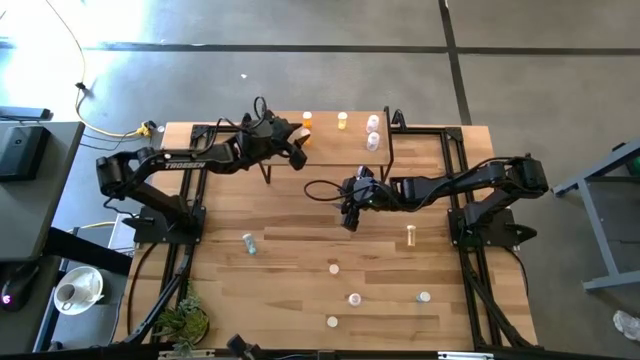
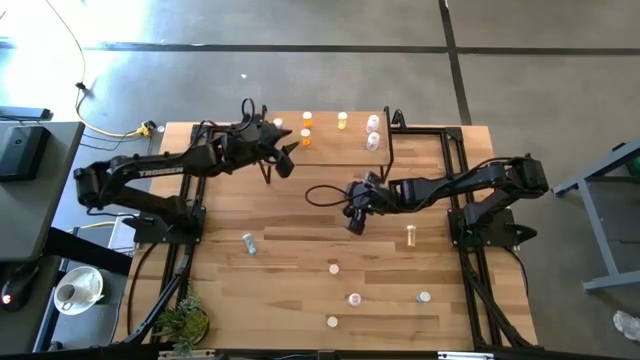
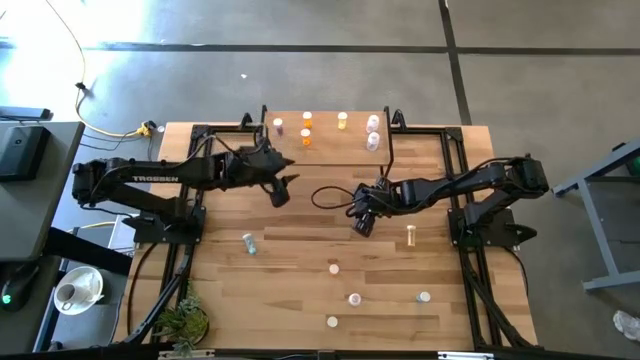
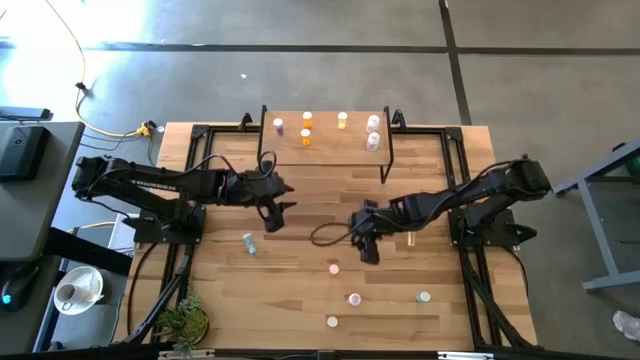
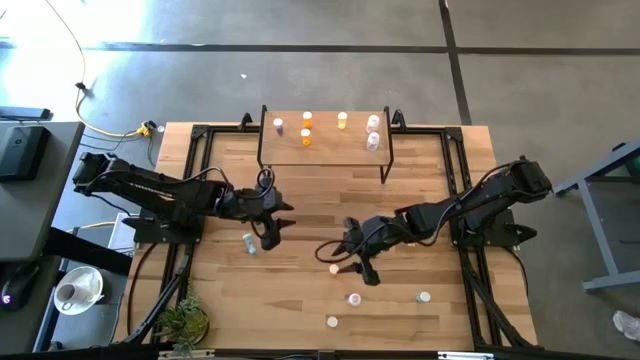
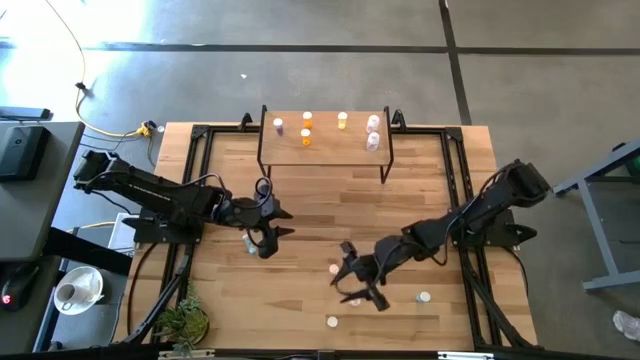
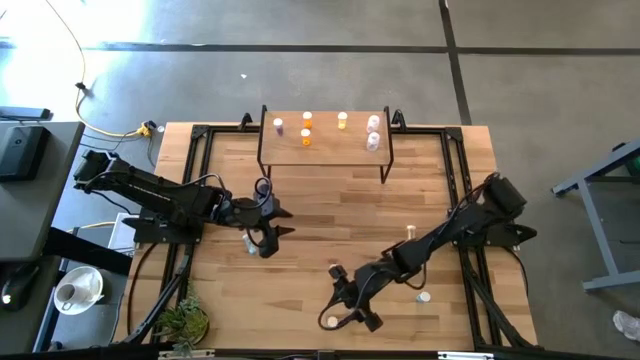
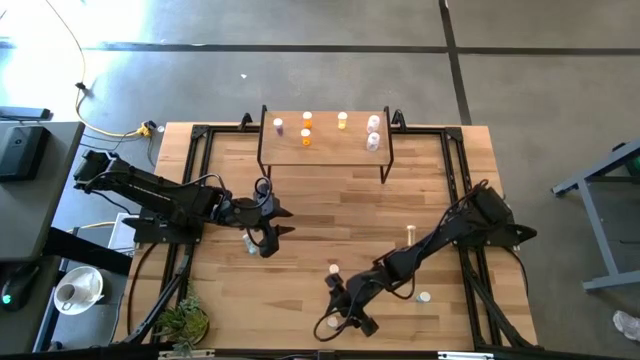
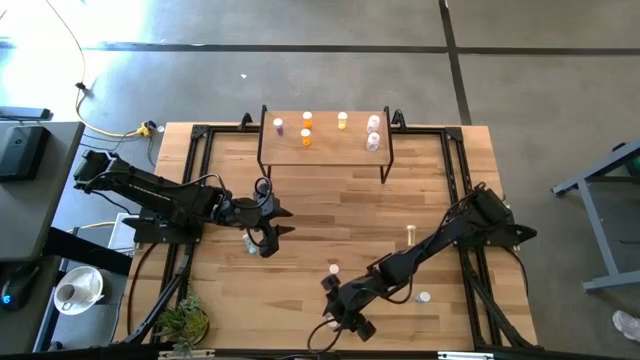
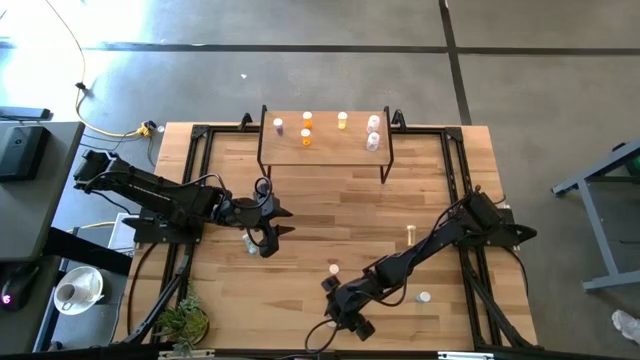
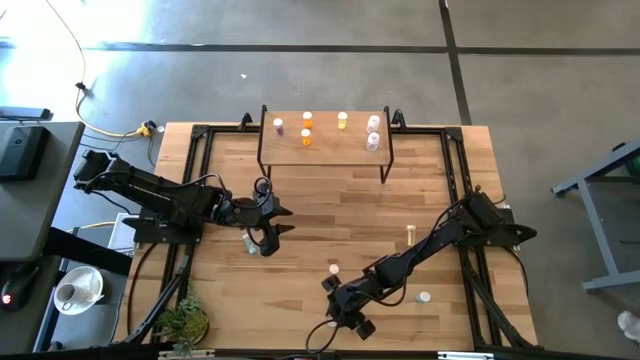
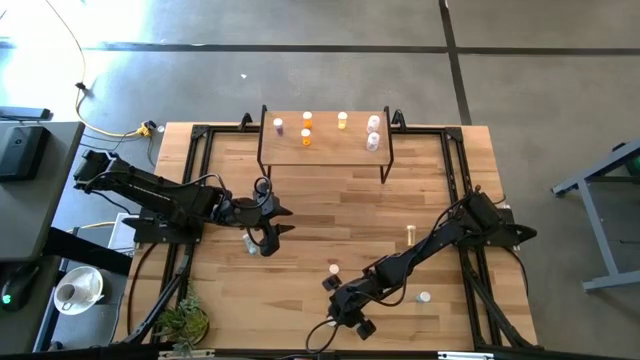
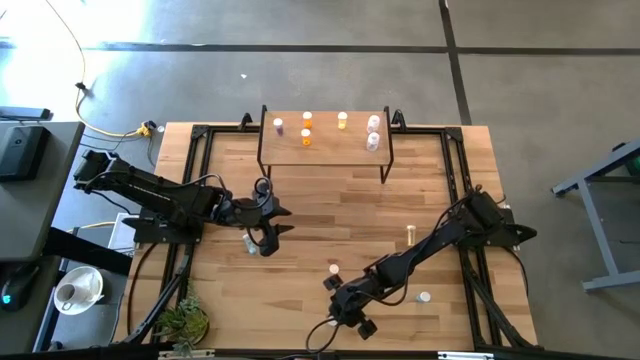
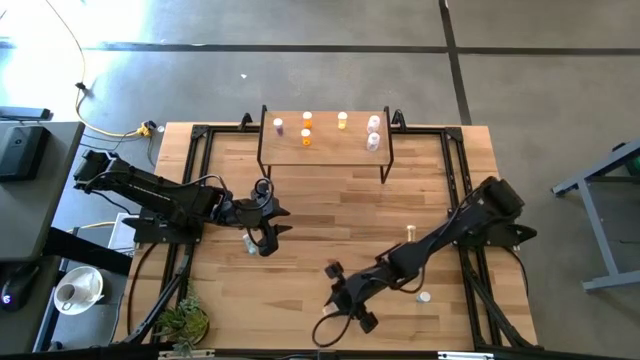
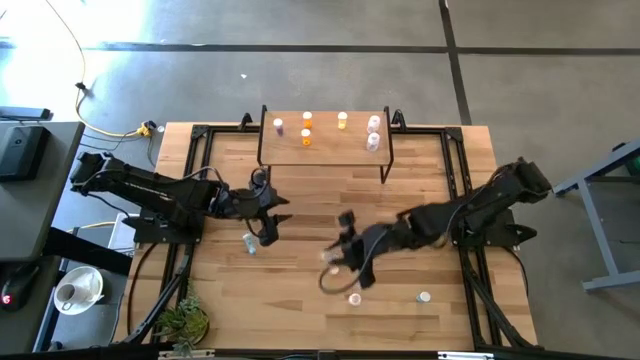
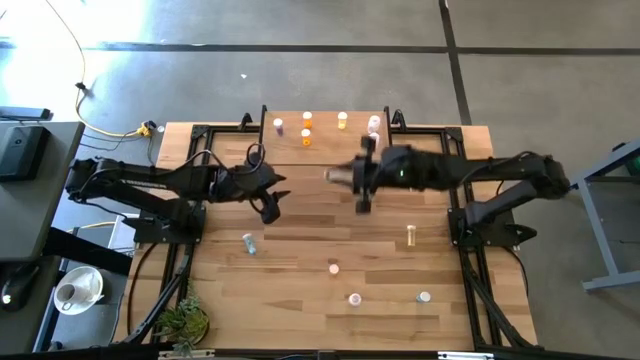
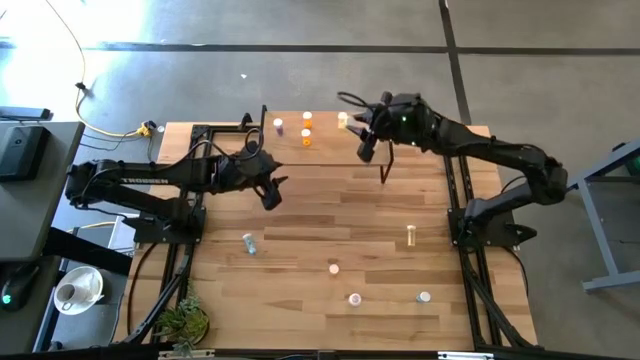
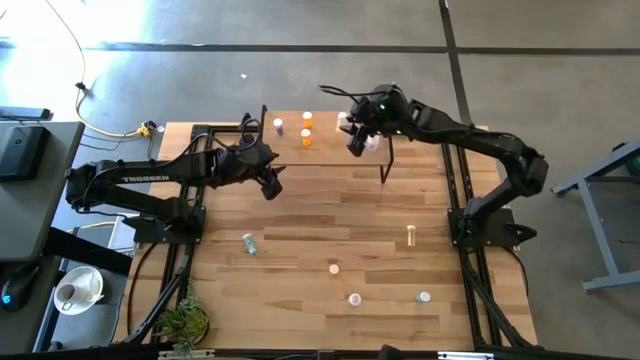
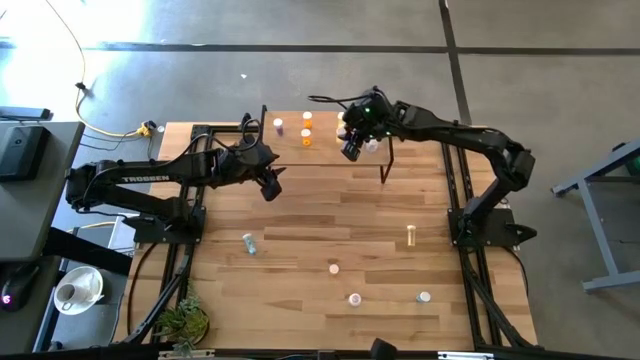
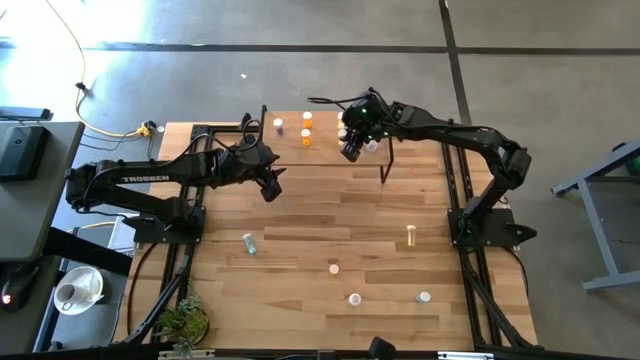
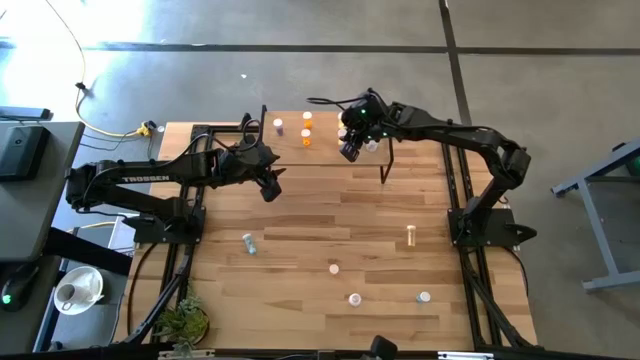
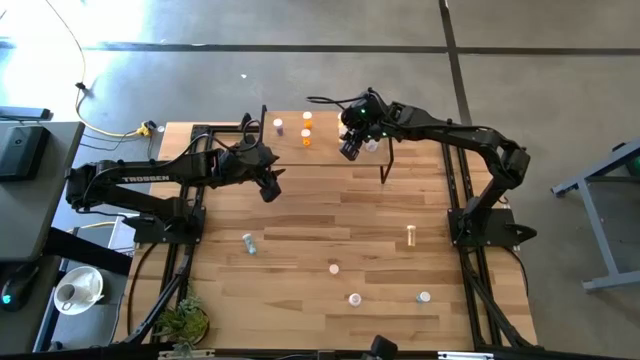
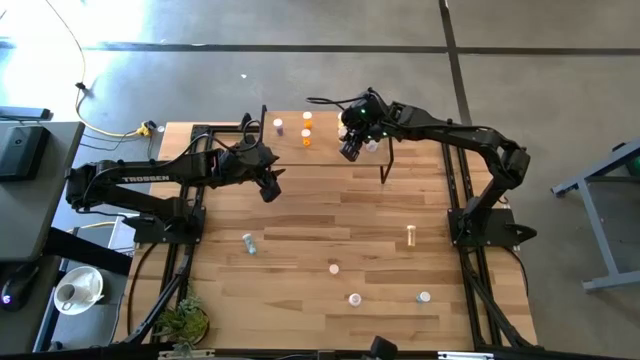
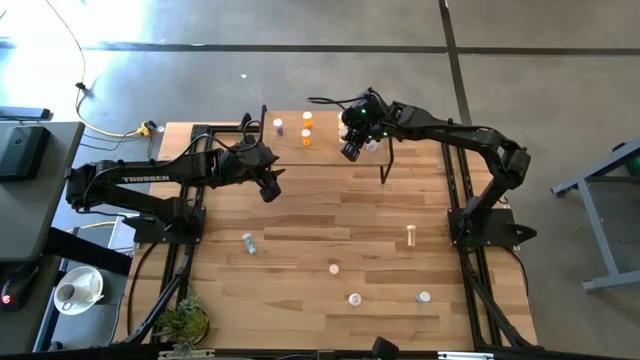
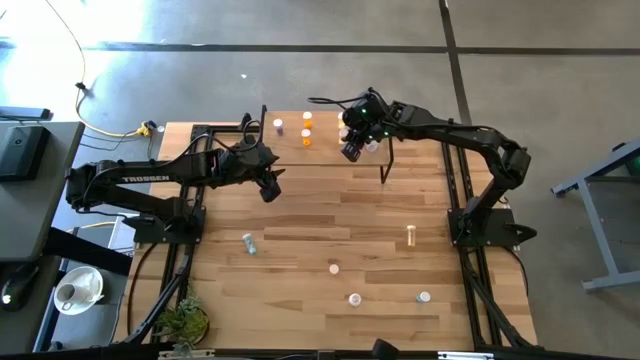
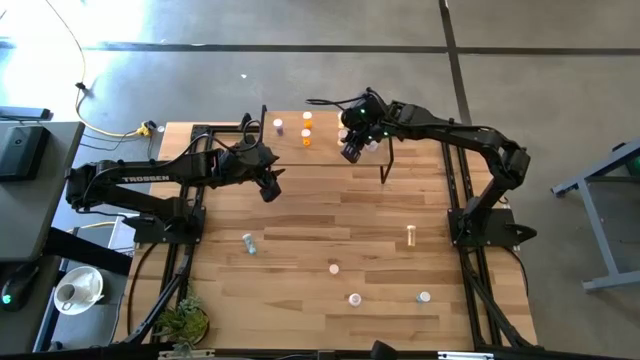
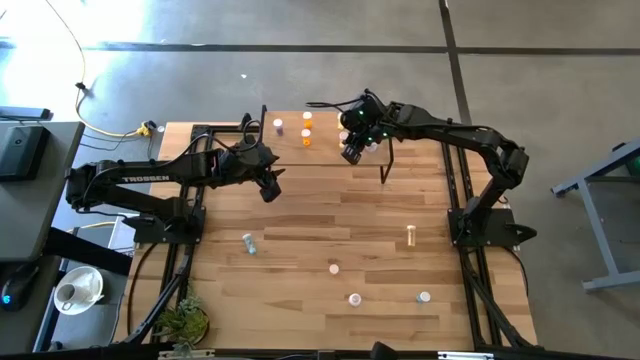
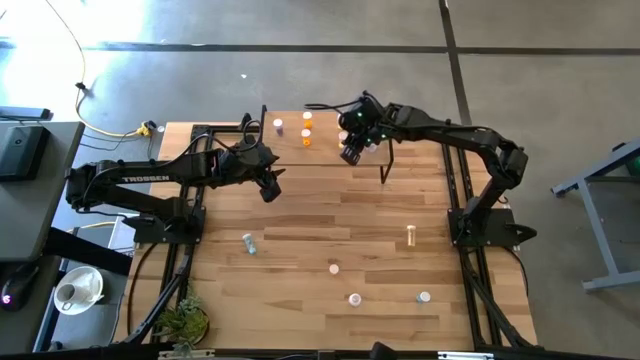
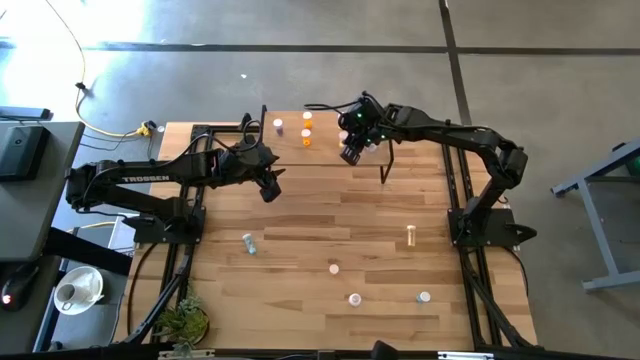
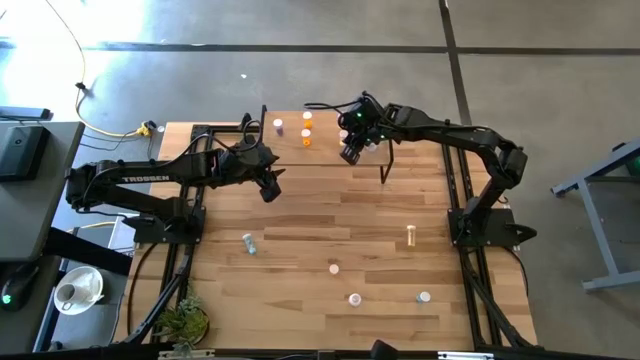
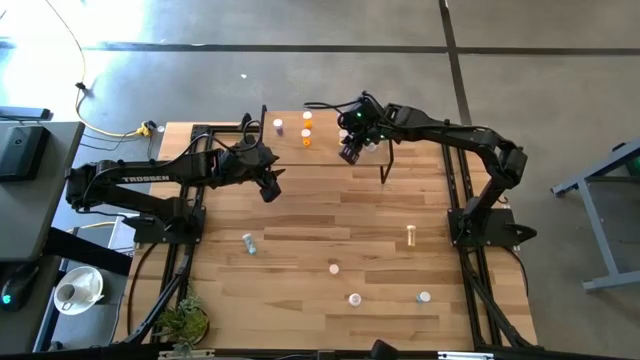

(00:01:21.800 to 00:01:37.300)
Task: Pick and place medicine bottles onto shelf by color
Put the bottom yellow pill bottle on the shelf aligned with the other yellow pill bottle

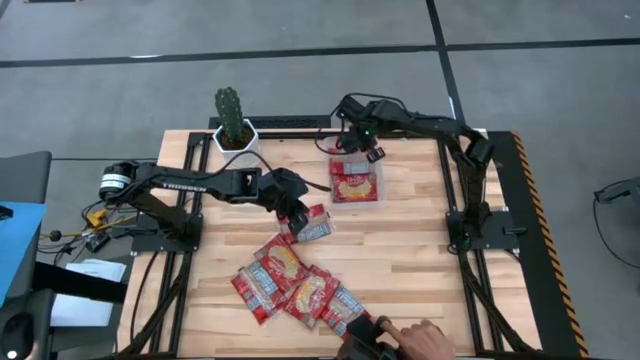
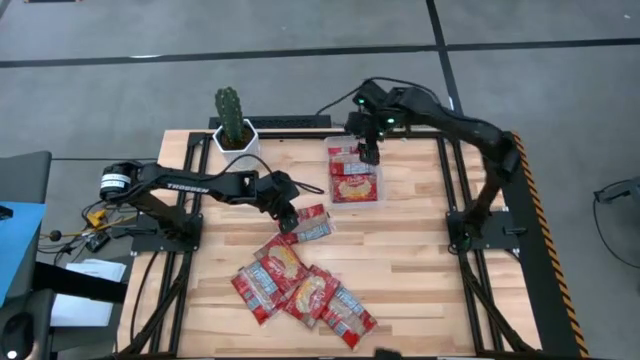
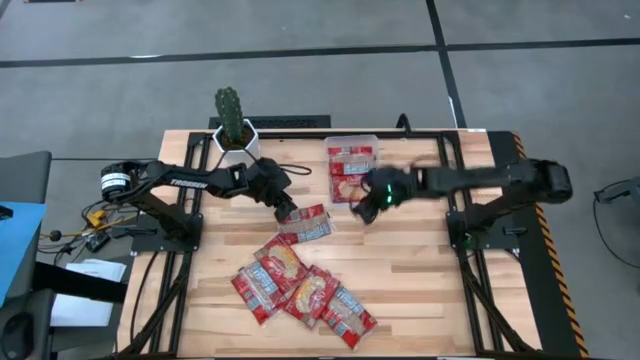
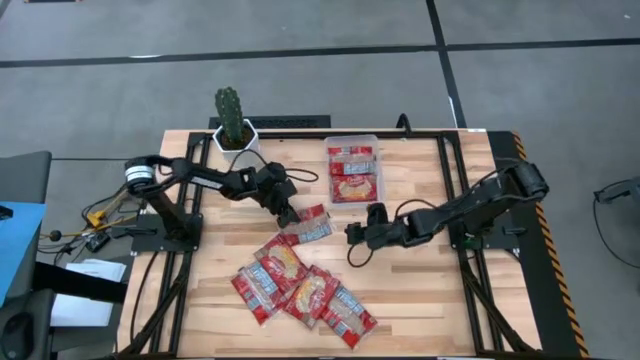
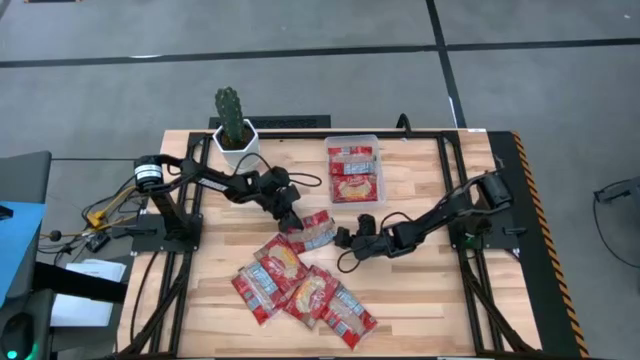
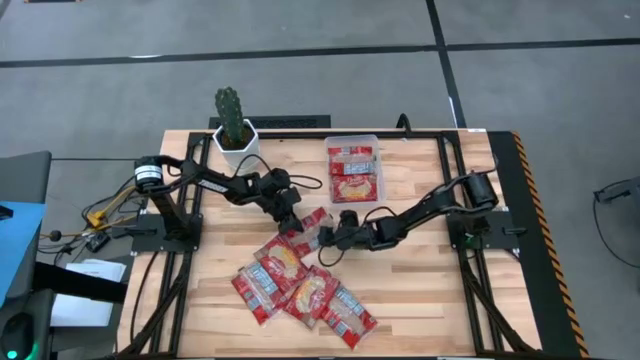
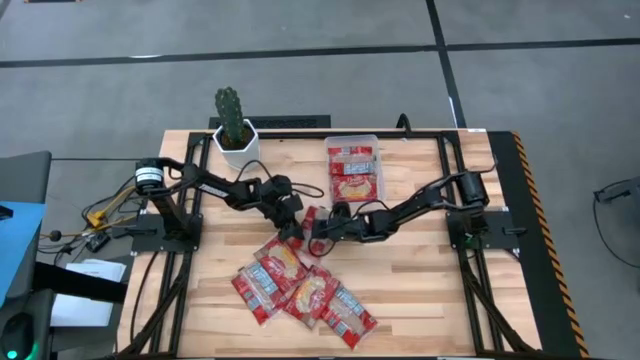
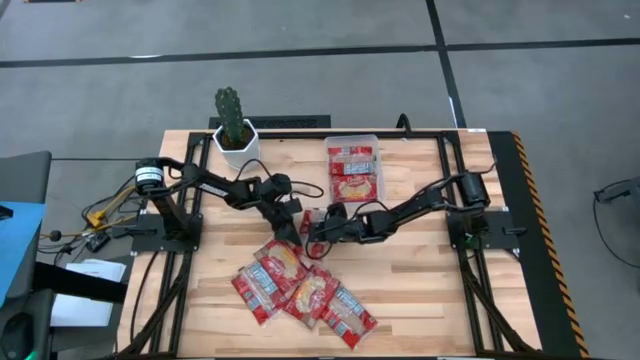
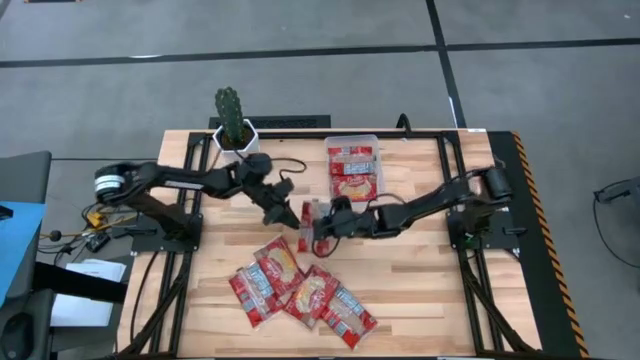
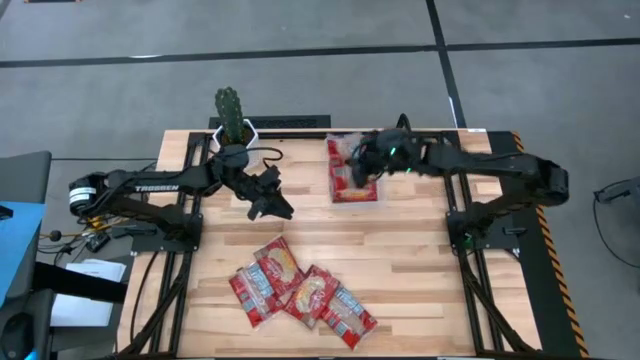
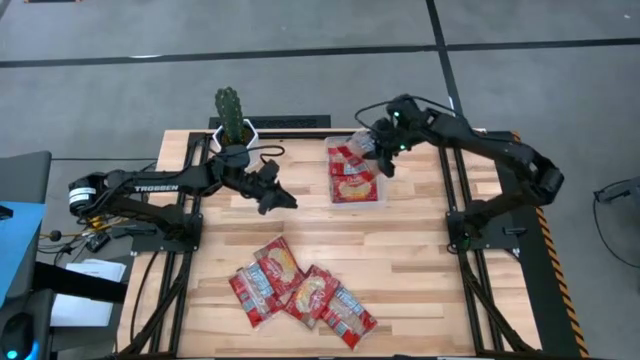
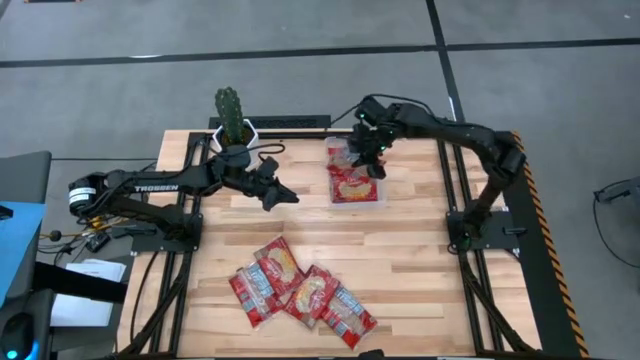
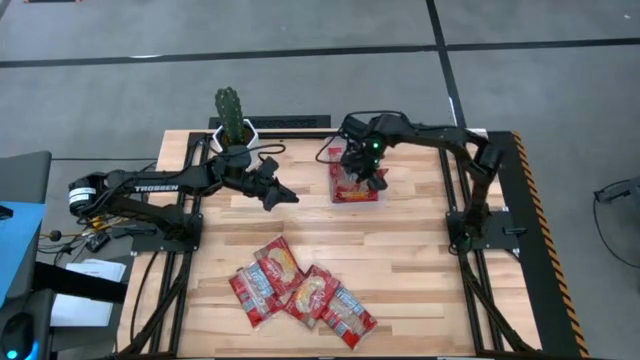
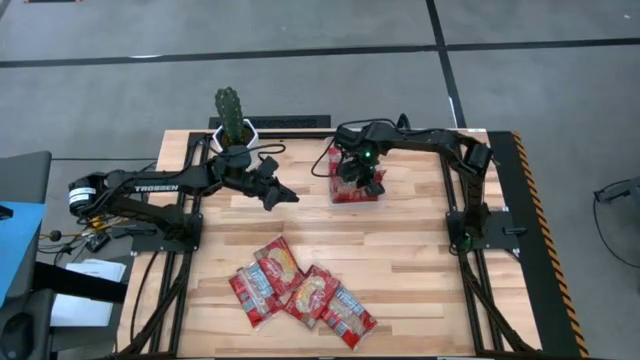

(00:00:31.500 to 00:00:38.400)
Task: Sort popcorn bags into baskets
Put the popcorn bag into the transparent bin
